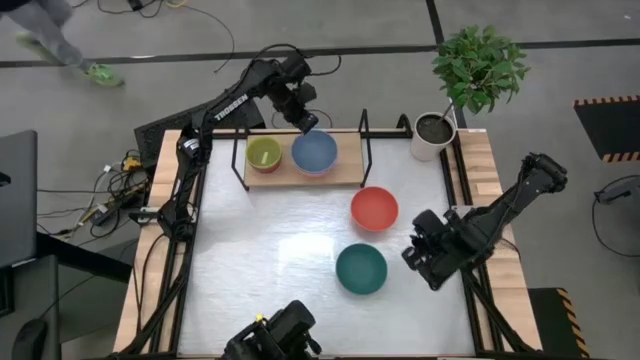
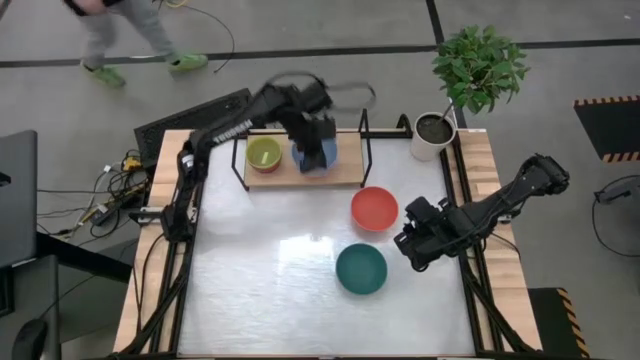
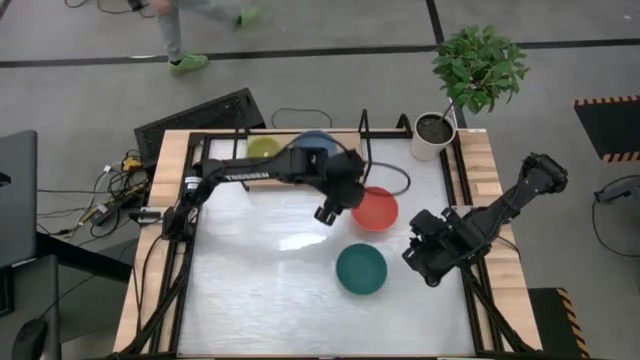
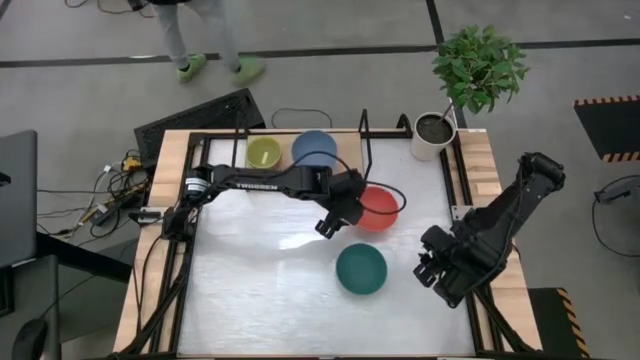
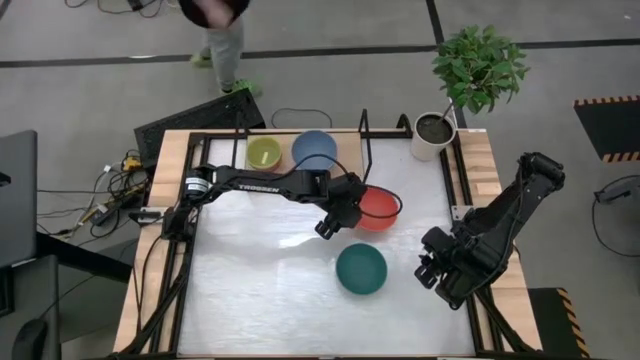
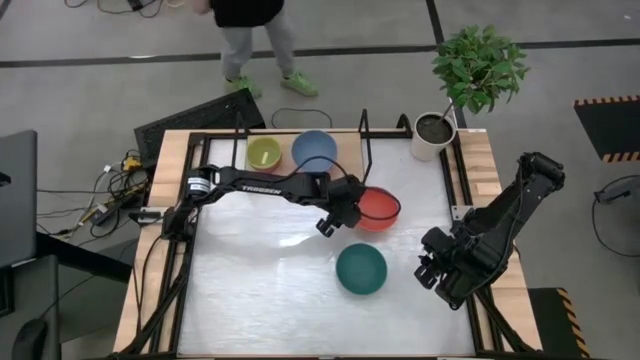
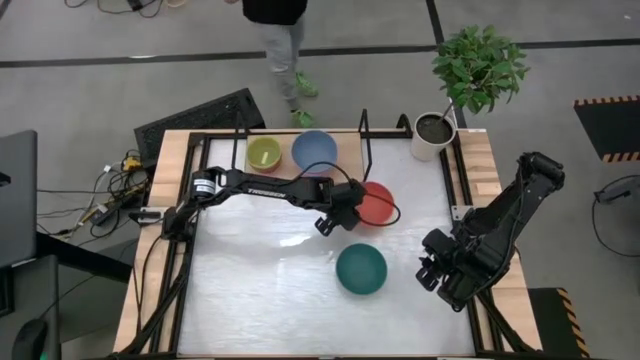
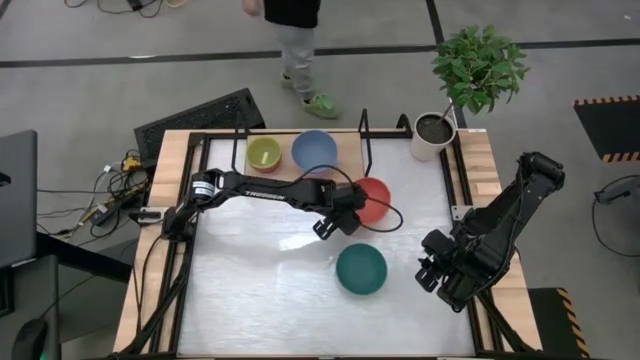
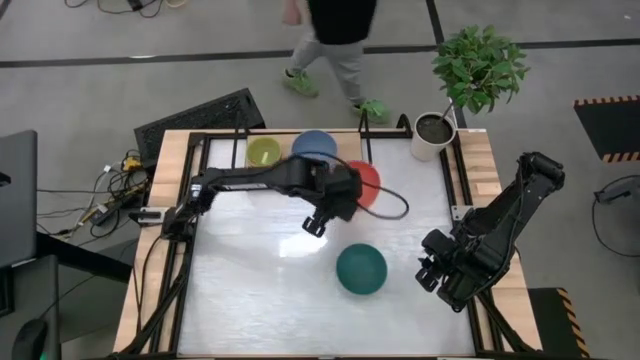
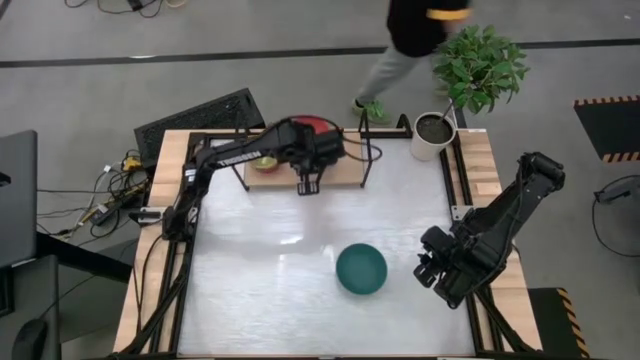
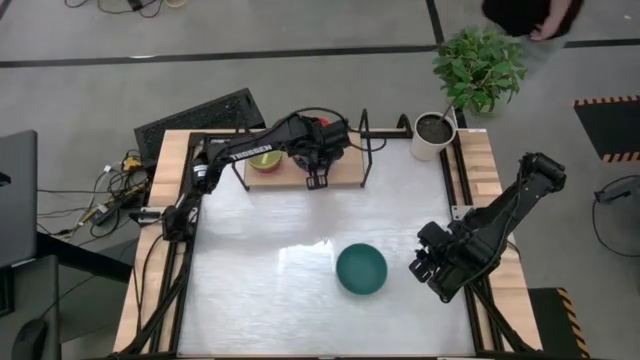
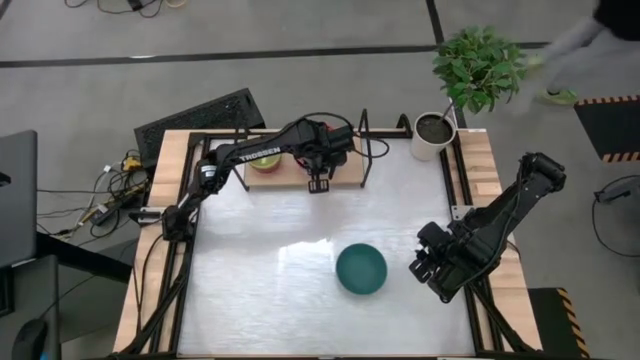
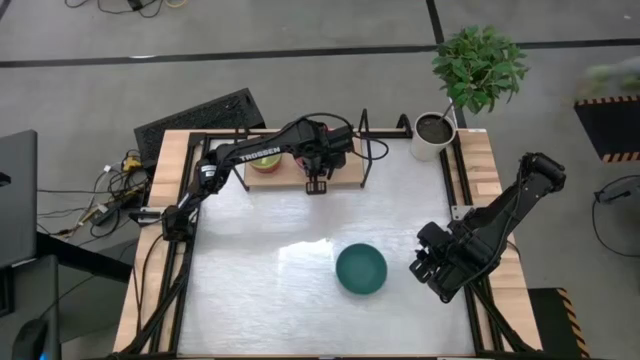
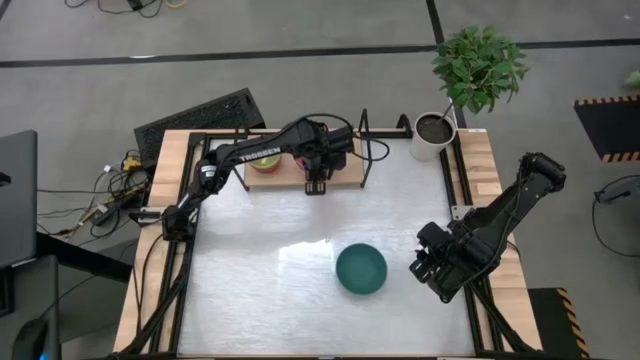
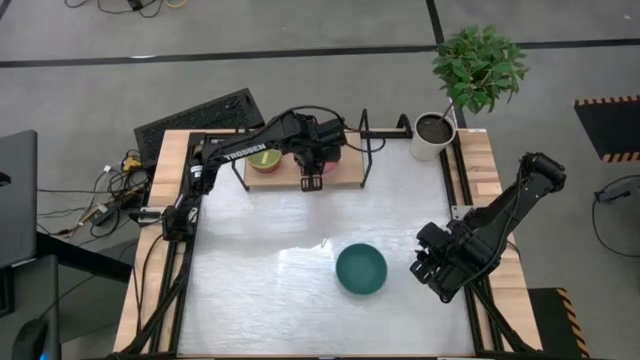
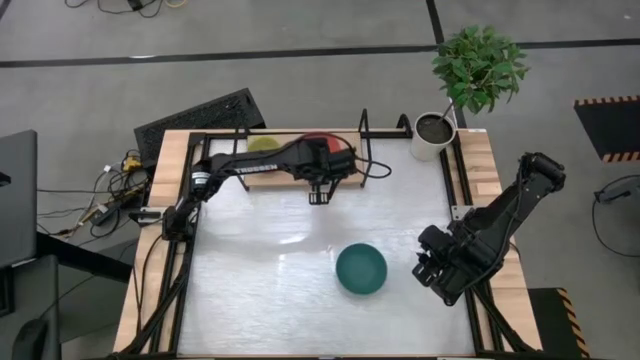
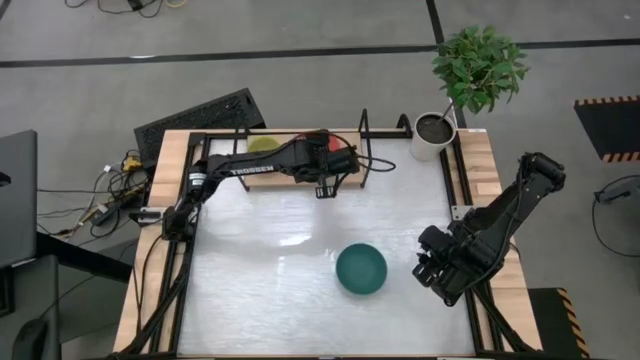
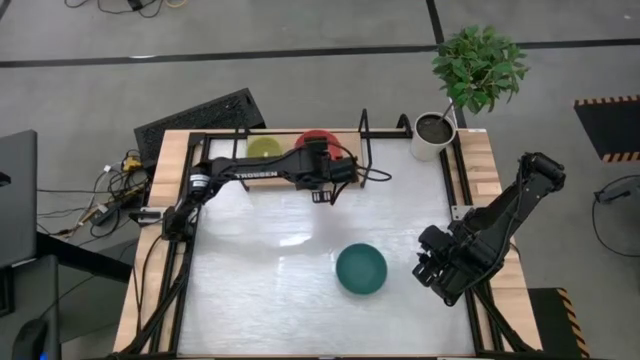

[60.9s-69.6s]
Task: Place and stack bowls onto a shelf
Stack the orange bowl on top of the blue bowl on the shelf

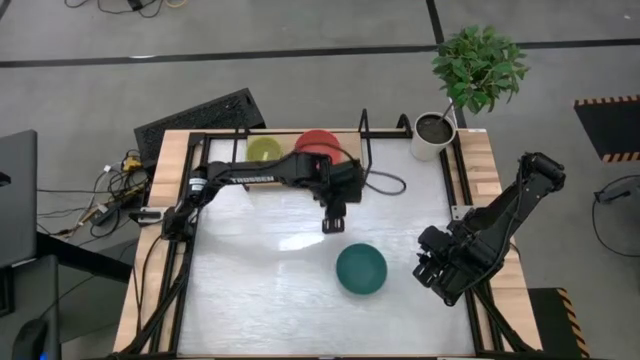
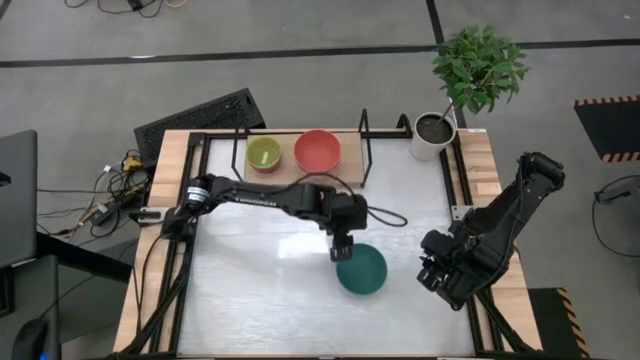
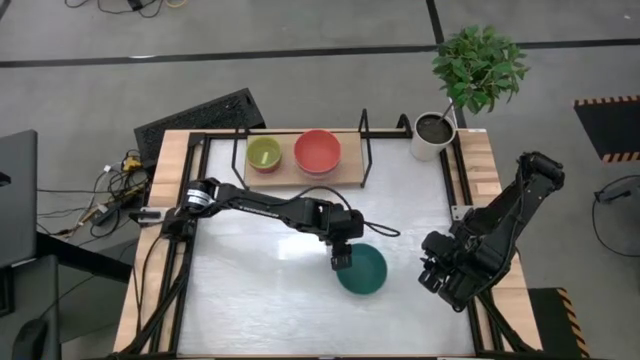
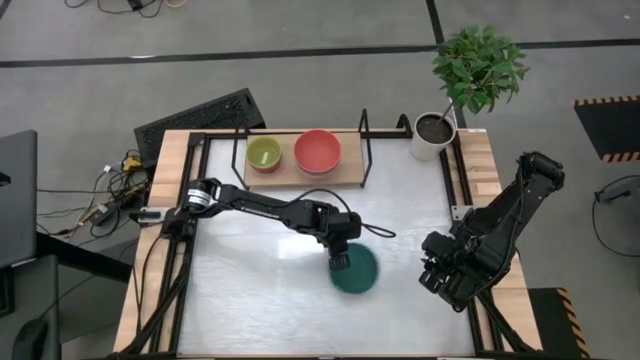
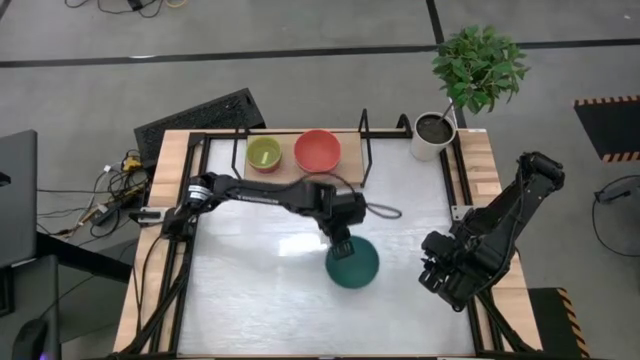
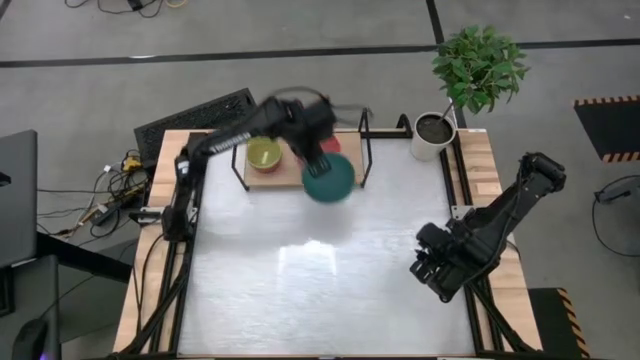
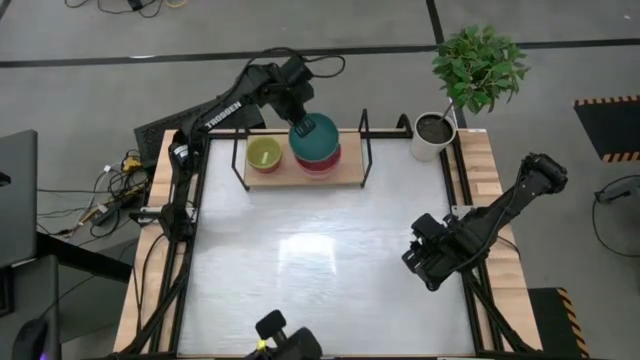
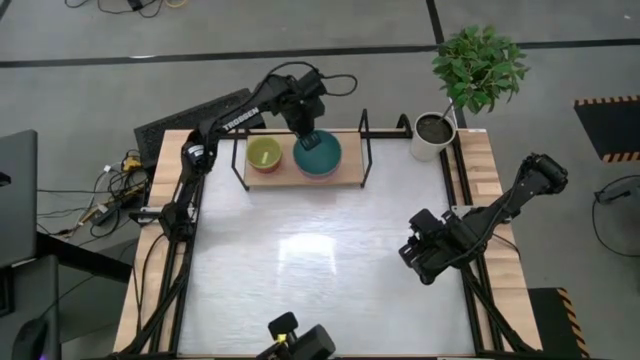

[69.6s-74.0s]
Stack the green bowl on top of the orange bowl on the shelf

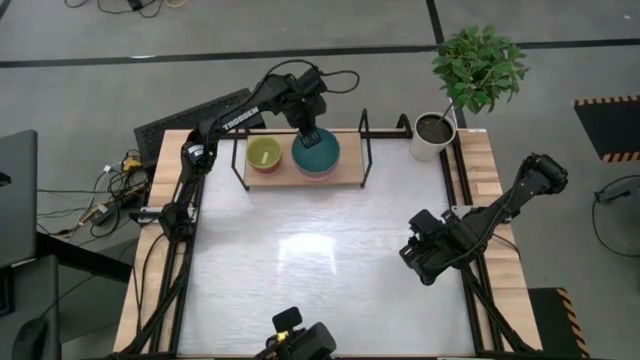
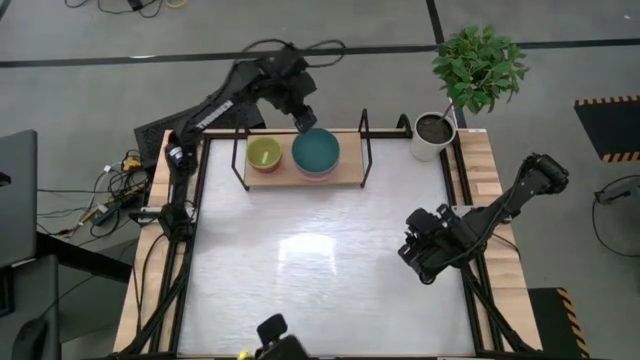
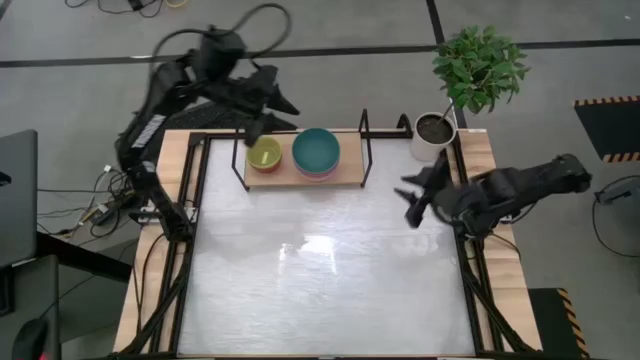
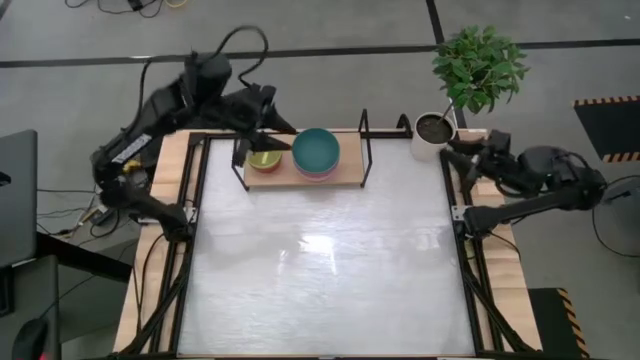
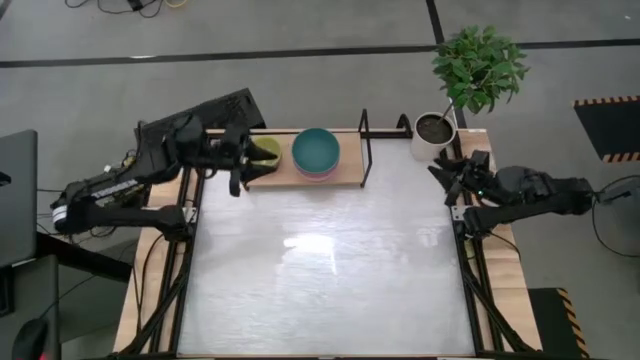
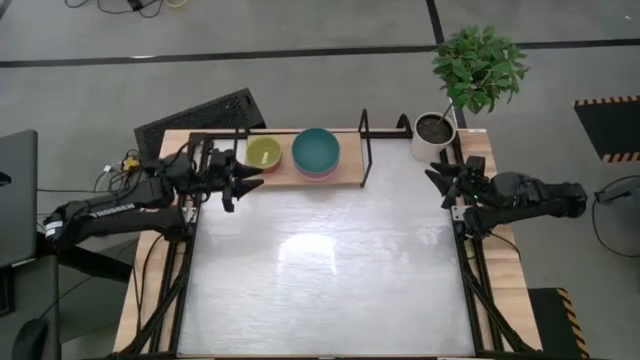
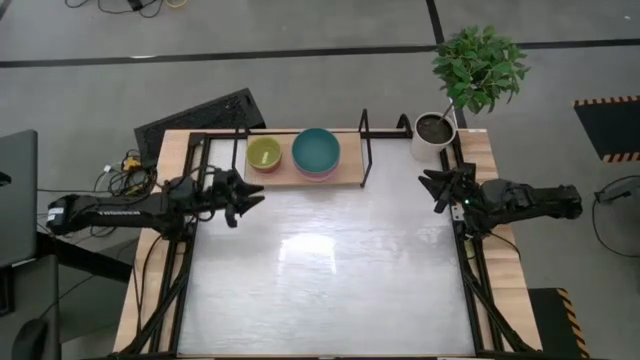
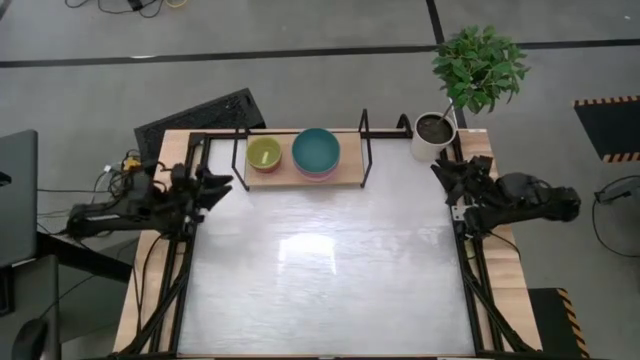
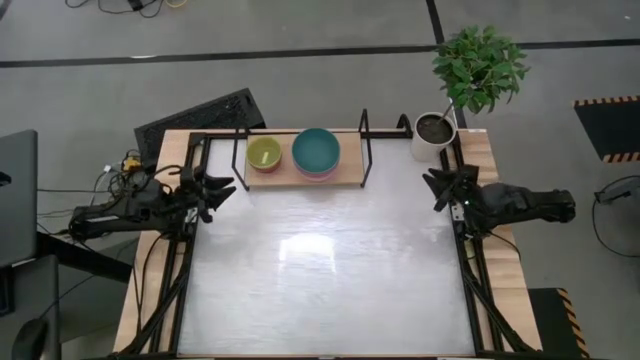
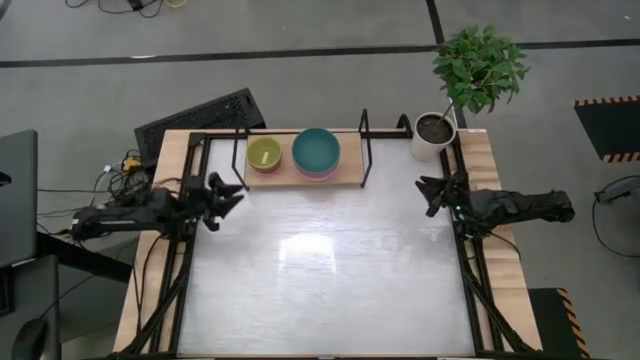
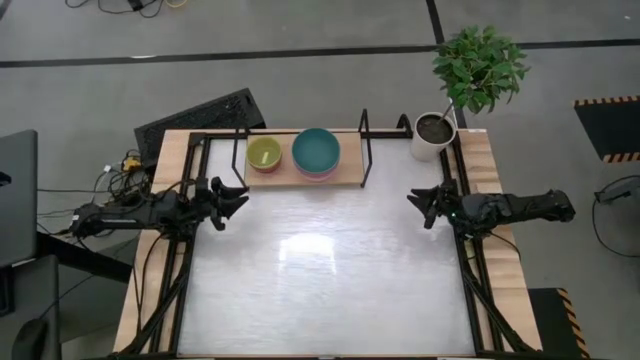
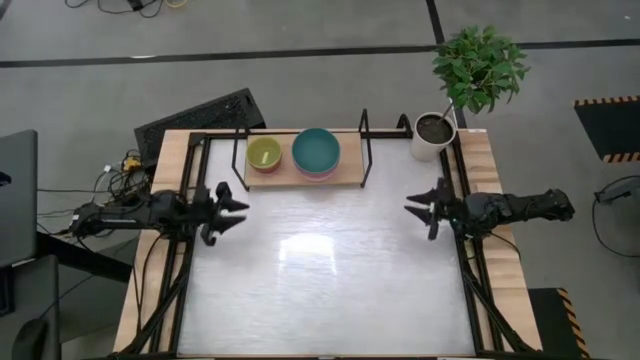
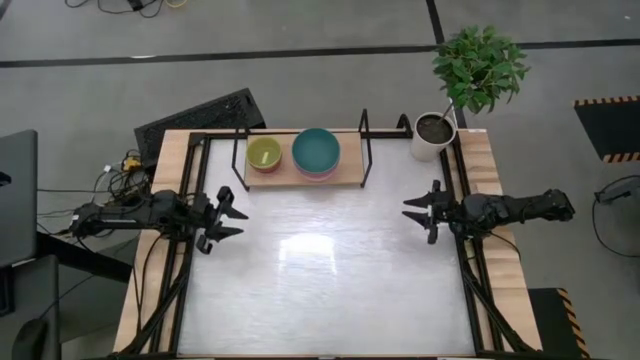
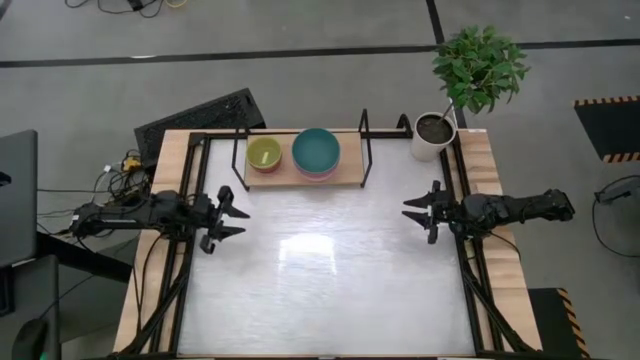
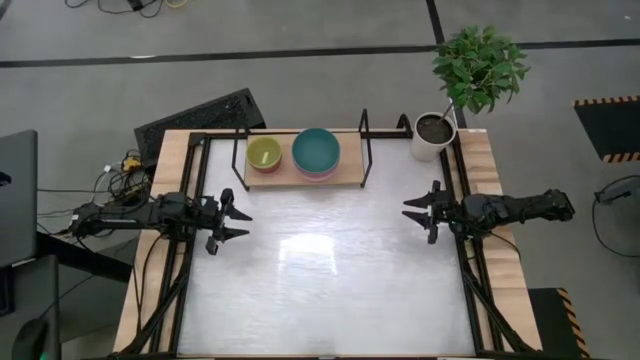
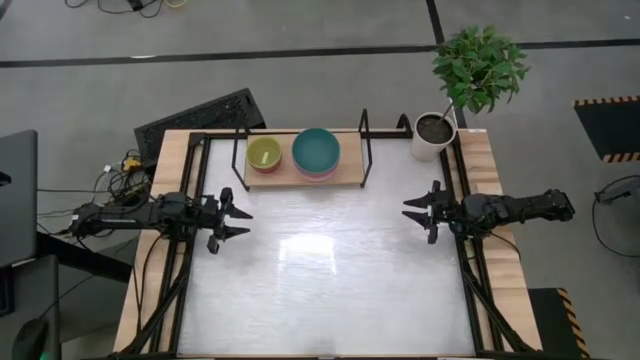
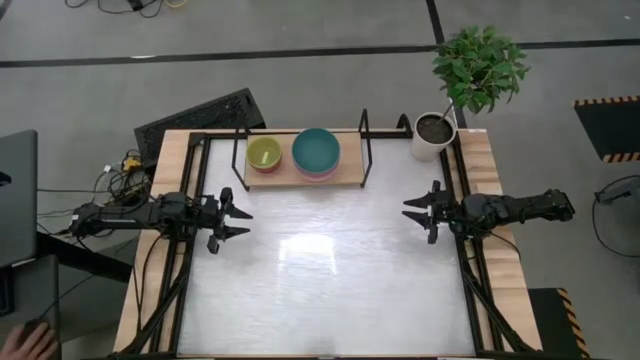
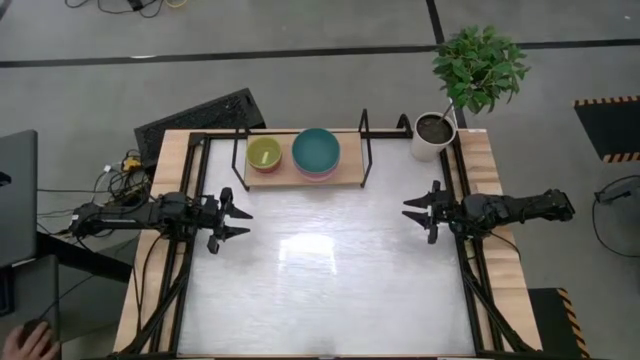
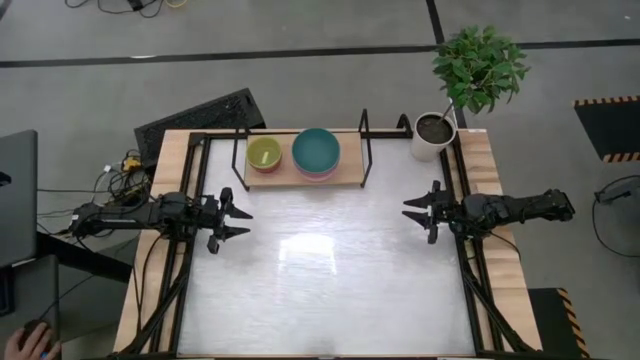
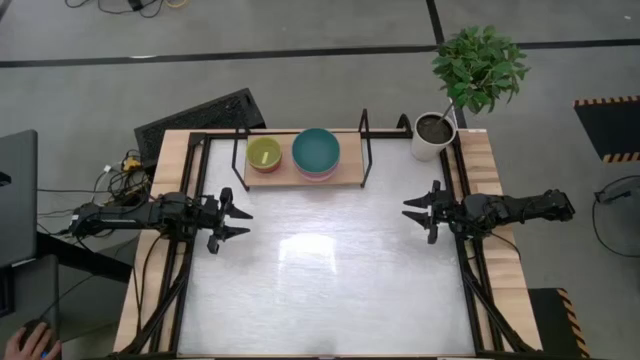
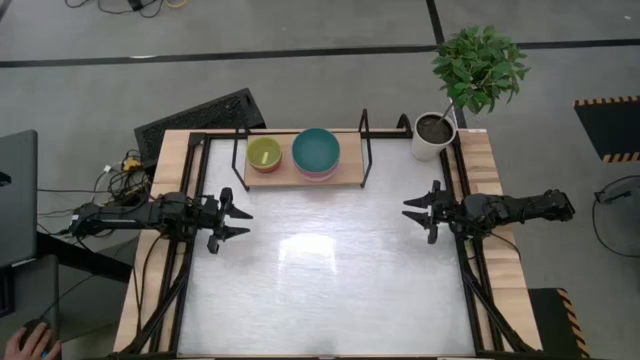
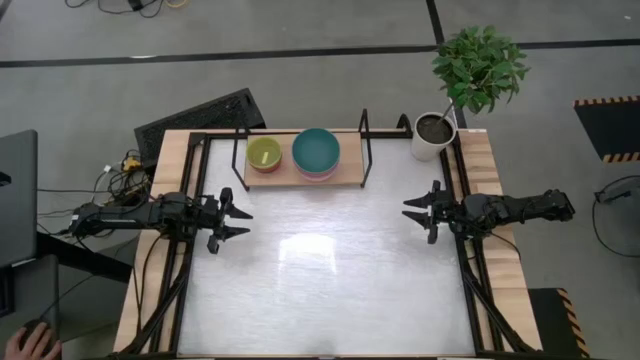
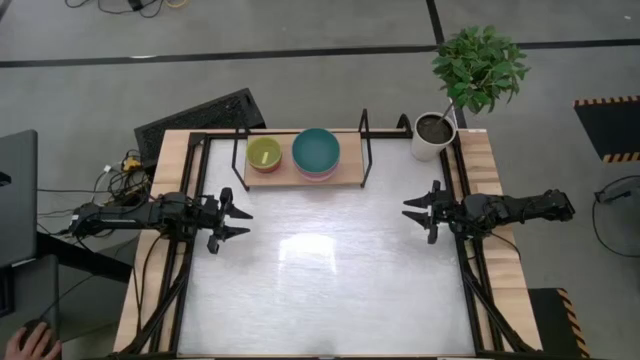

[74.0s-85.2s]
Return to Home Position
